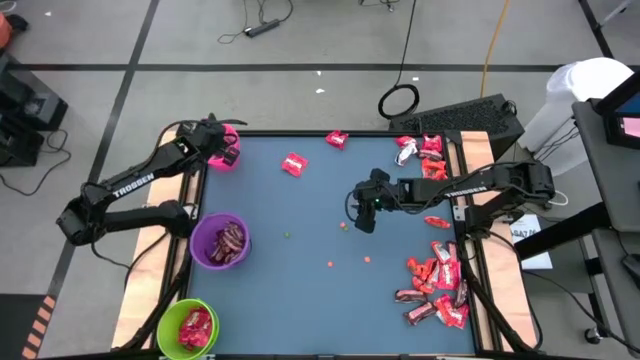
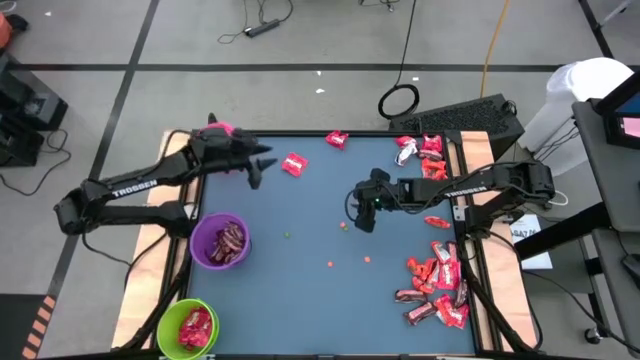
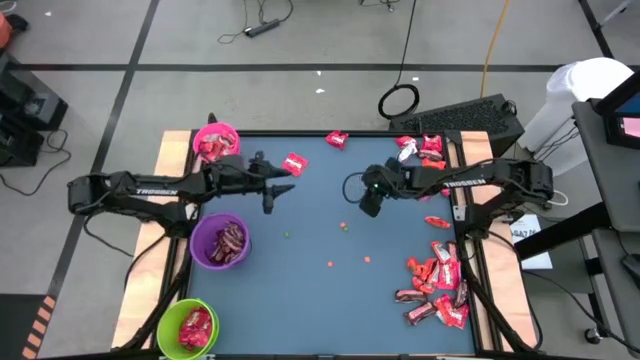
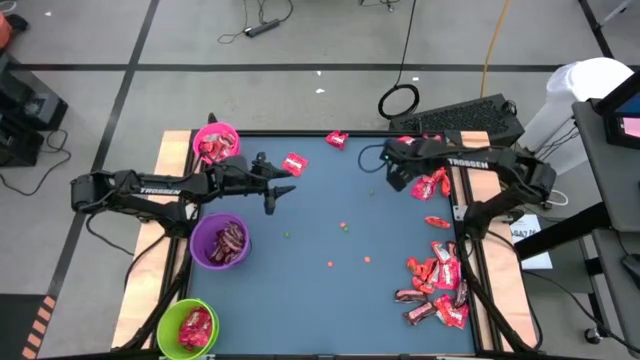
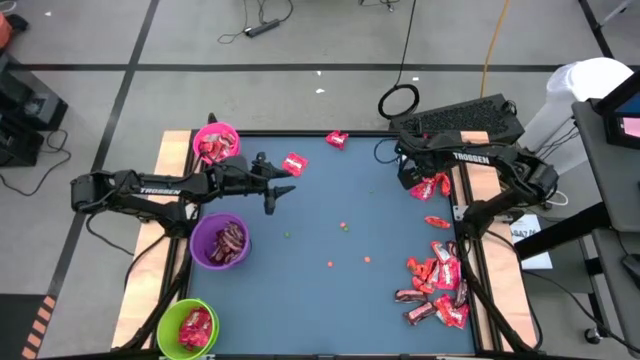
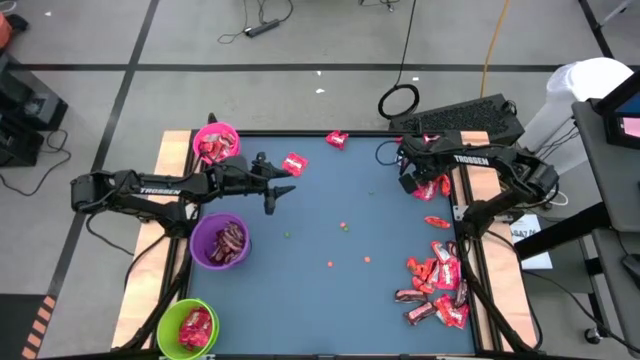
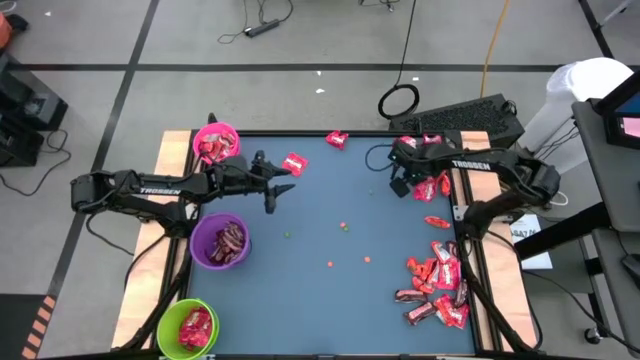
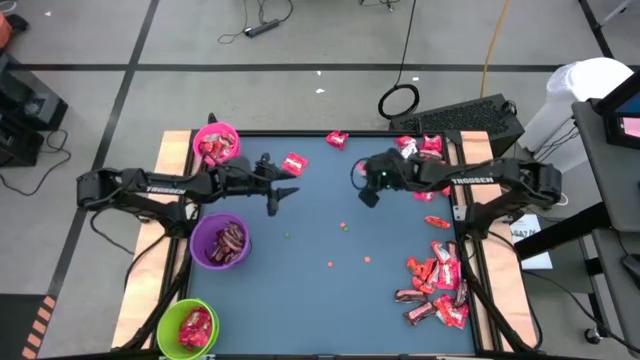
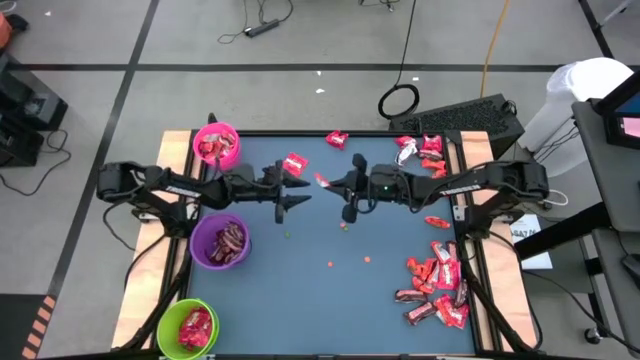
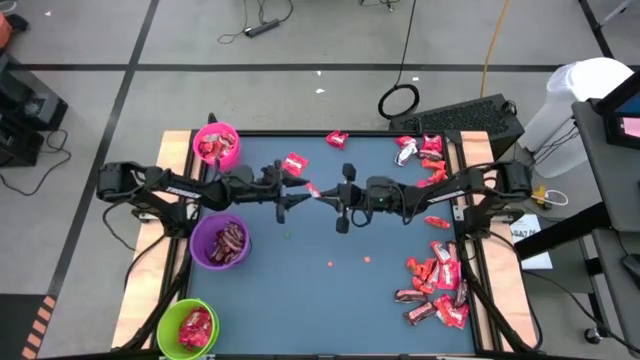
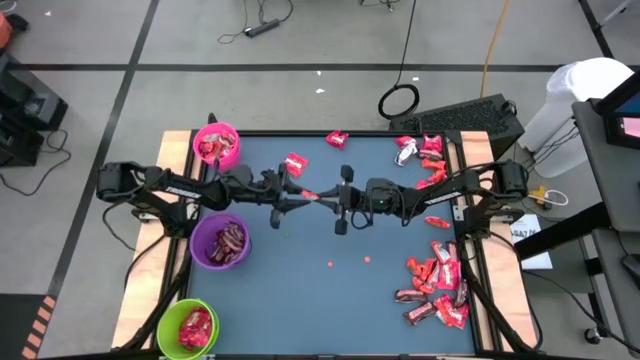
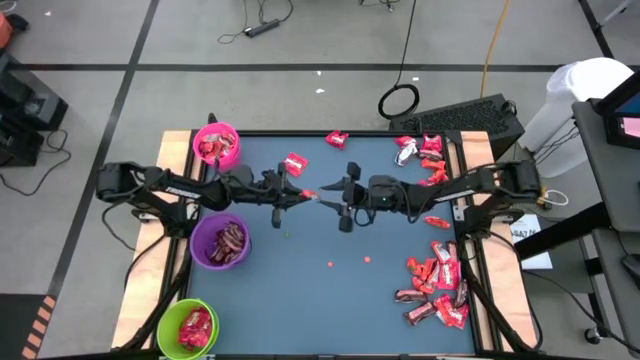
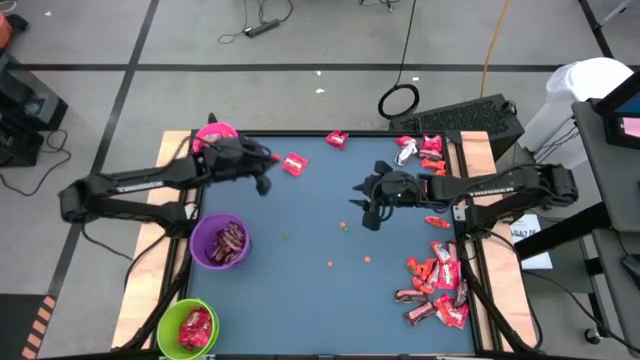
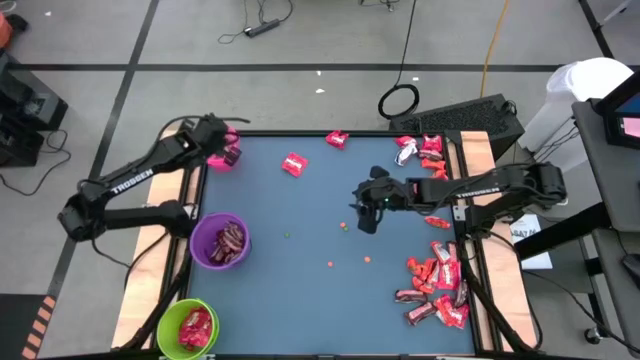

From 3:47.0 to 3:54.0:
Task: Organize candy in baskets
Put the orange chocolate into the pink bucket

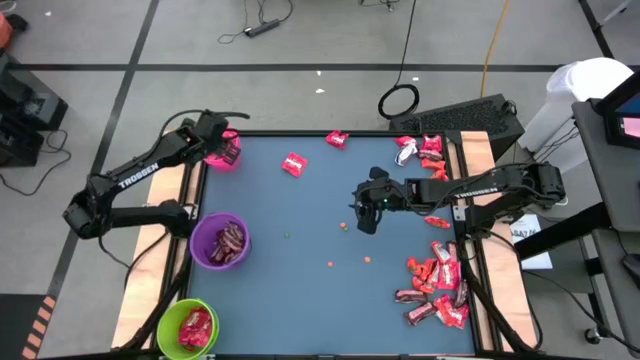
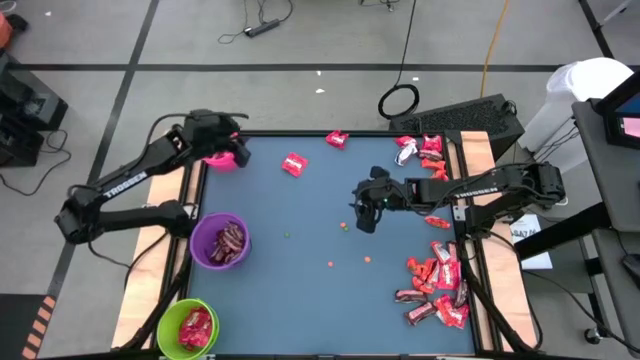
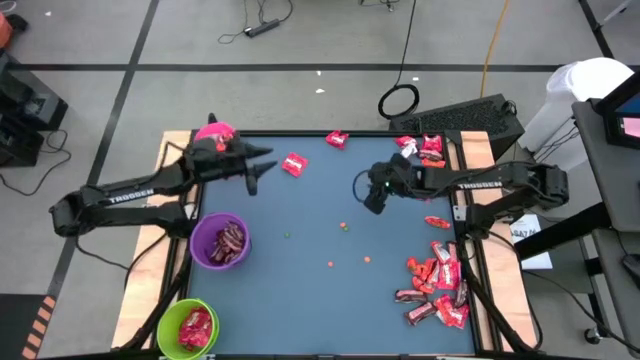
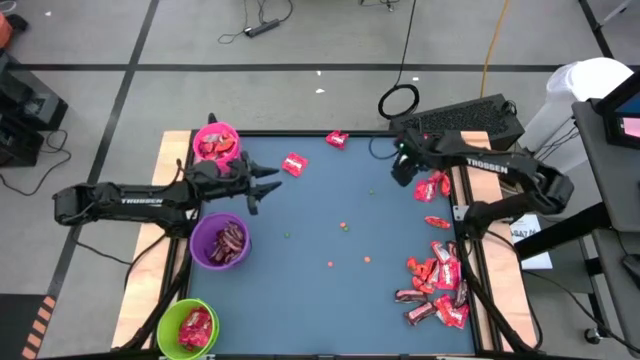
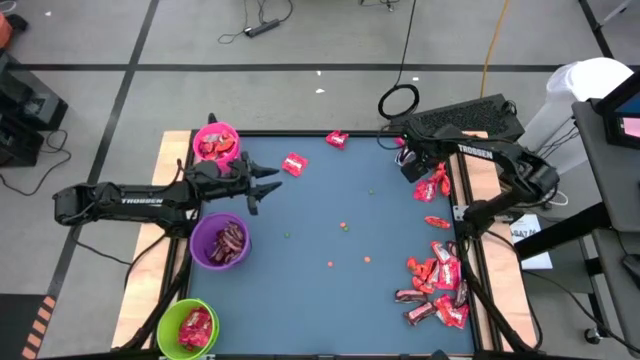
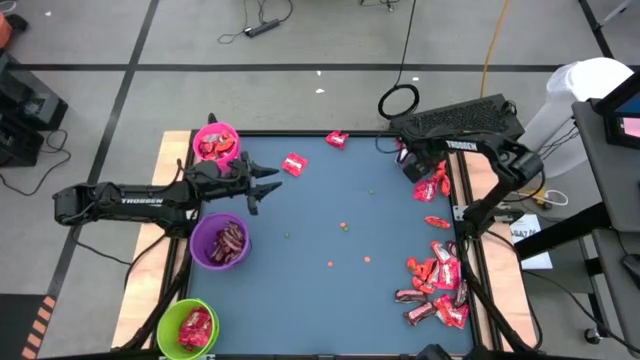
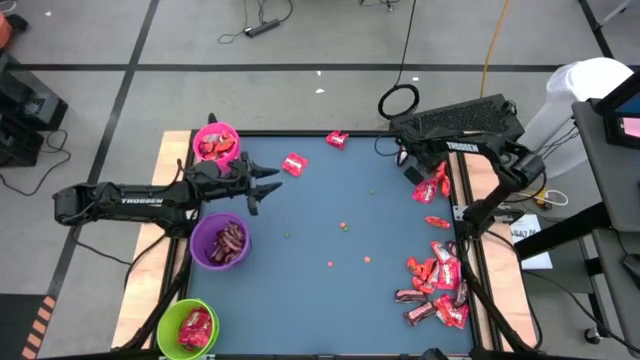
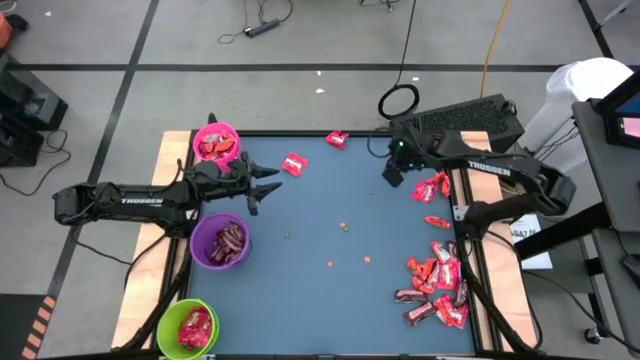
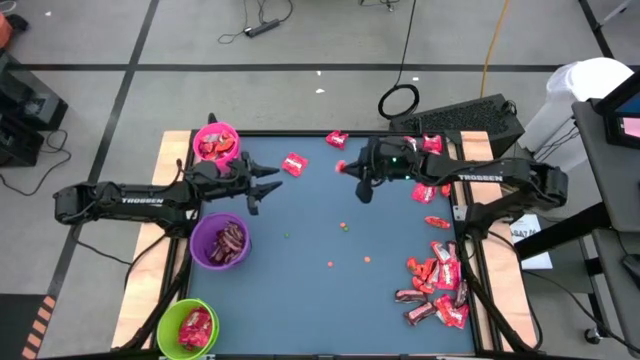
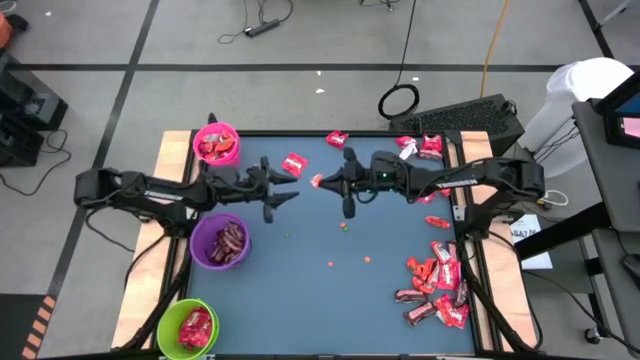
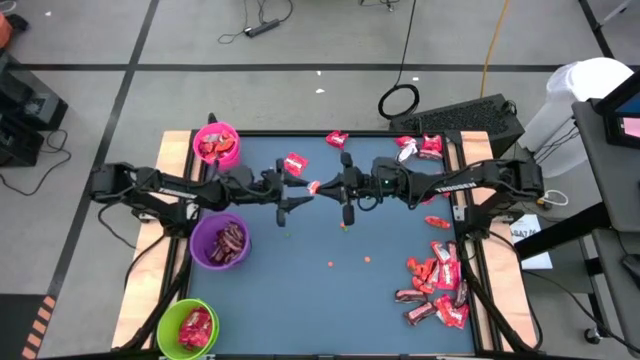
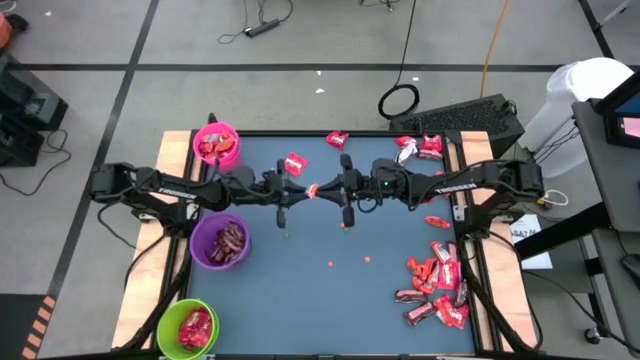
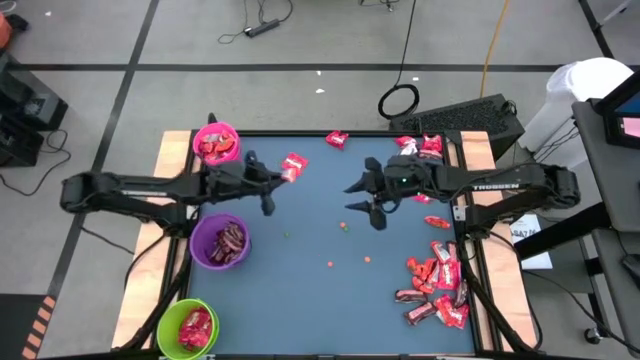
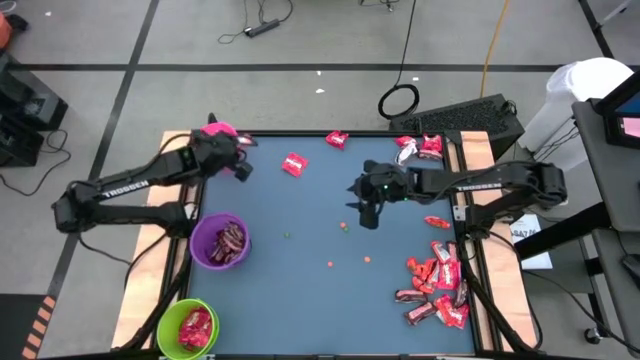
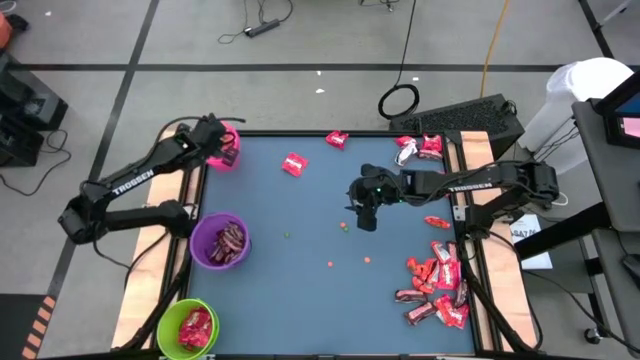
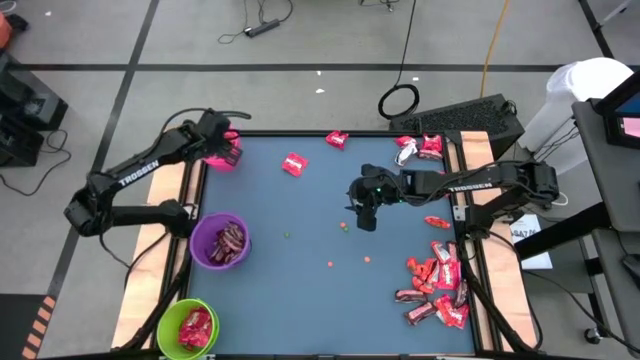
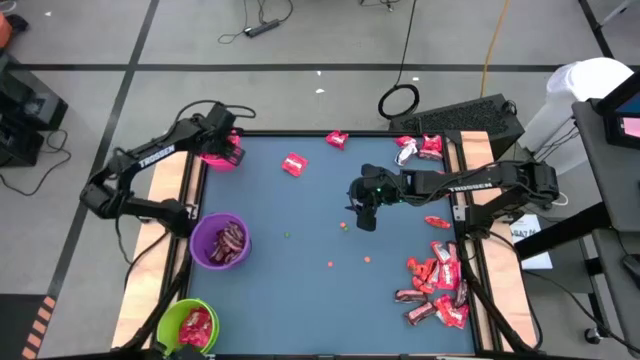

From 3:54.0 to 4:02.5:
Put the orange chocolate into the pink bucket

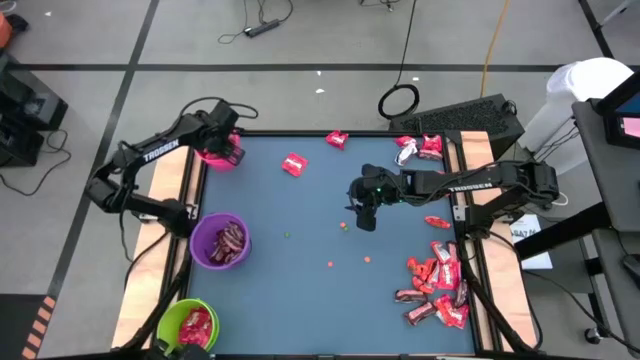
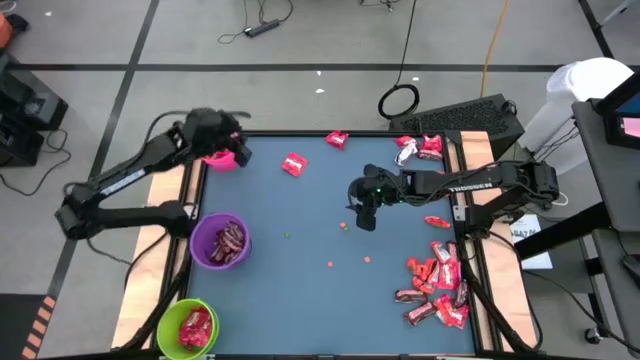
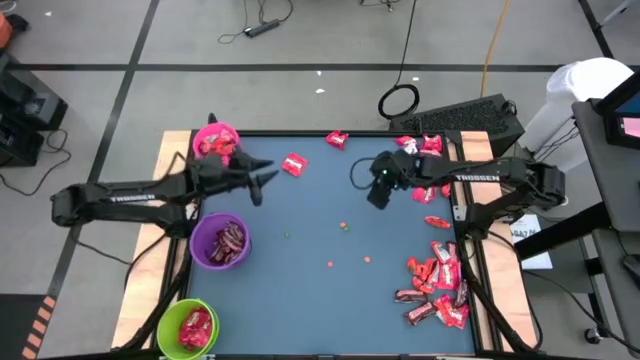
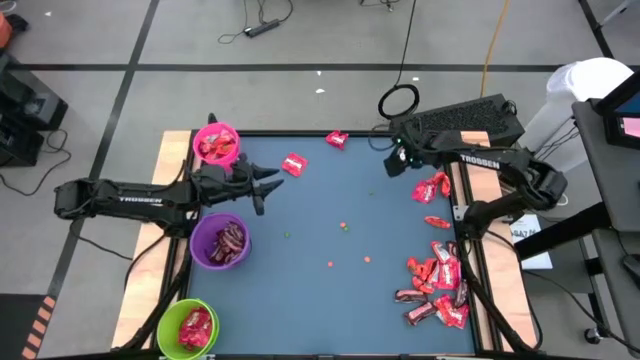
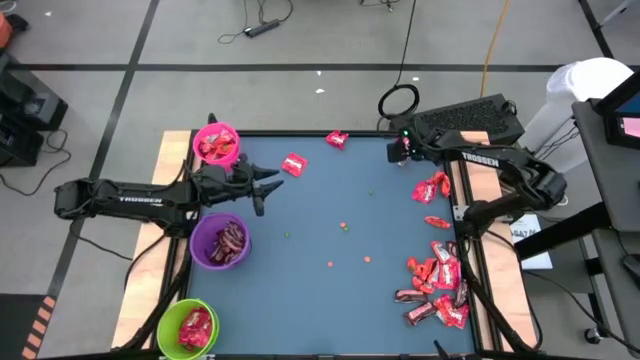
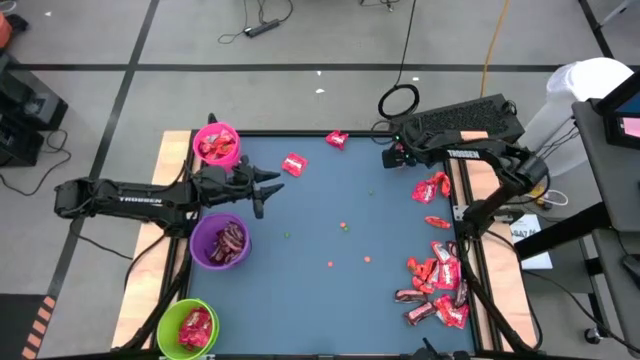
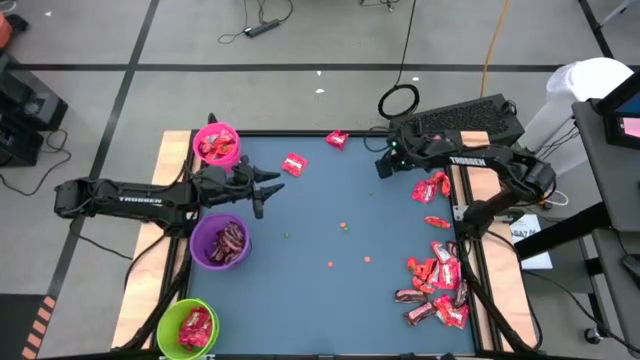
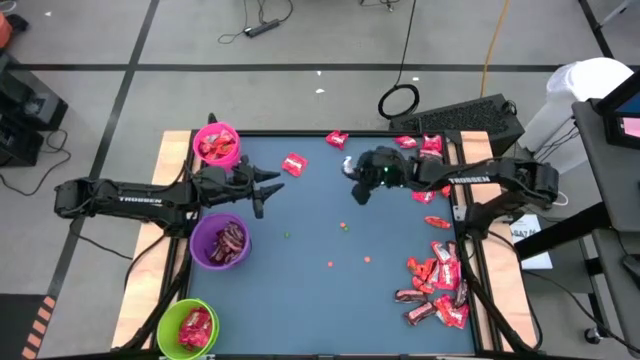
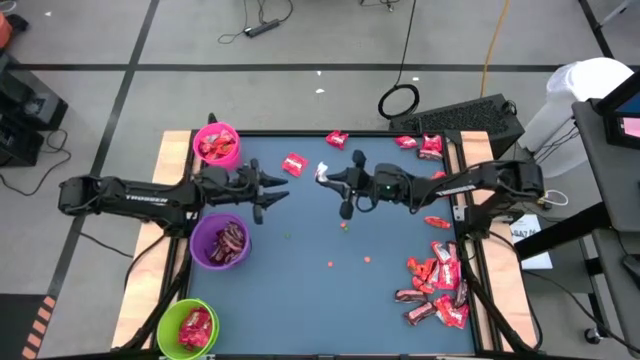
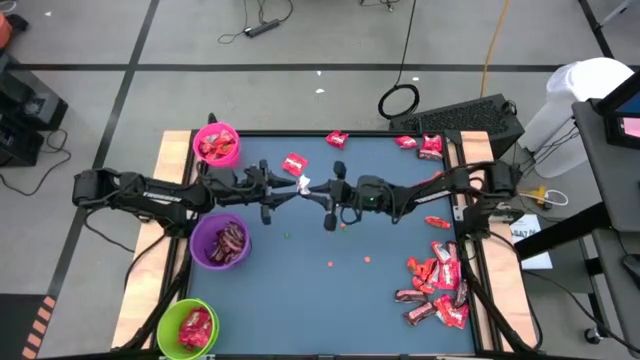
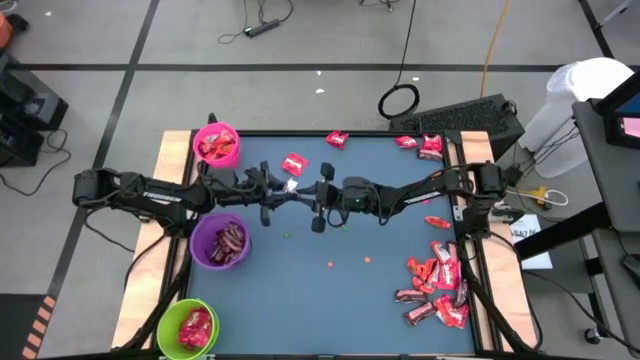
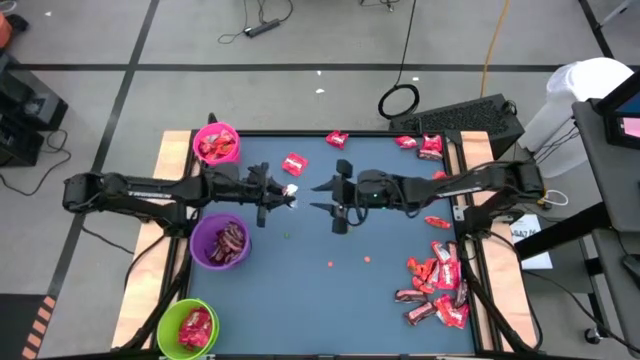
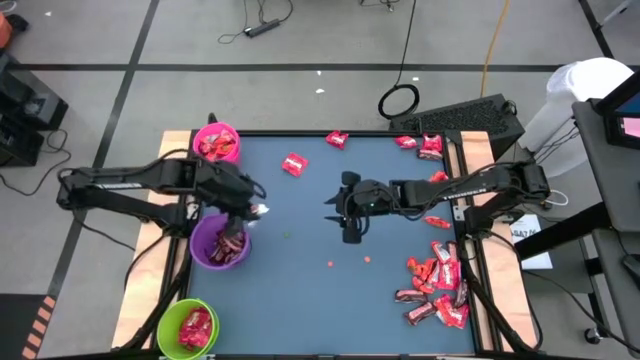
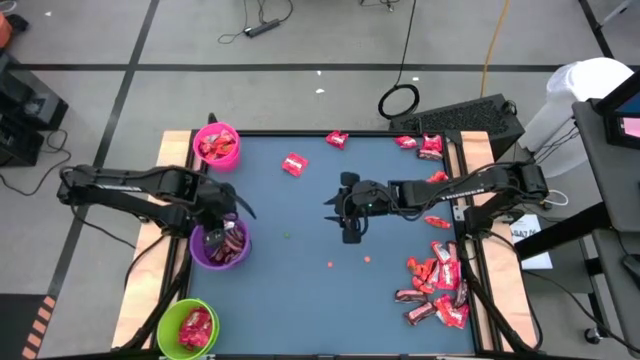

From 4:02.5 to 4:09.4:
Put the white chocolate into the violet bucket
